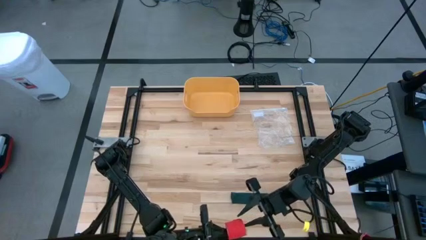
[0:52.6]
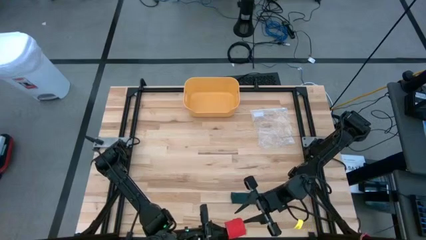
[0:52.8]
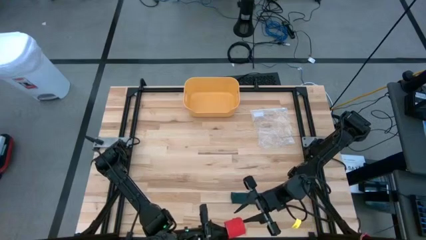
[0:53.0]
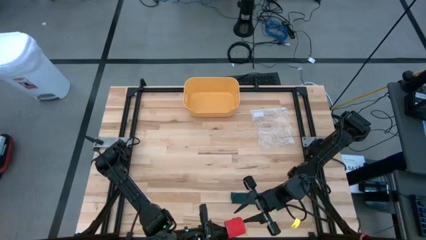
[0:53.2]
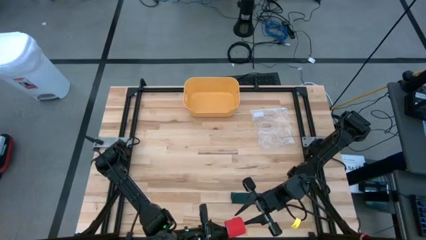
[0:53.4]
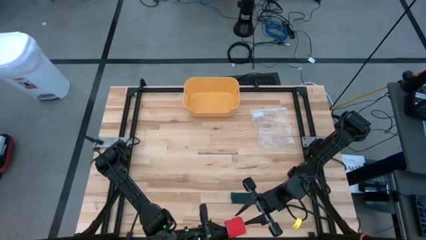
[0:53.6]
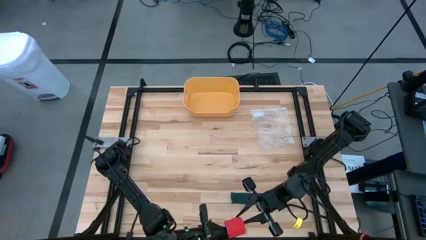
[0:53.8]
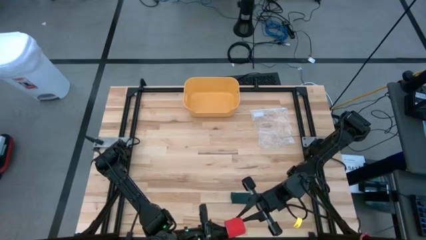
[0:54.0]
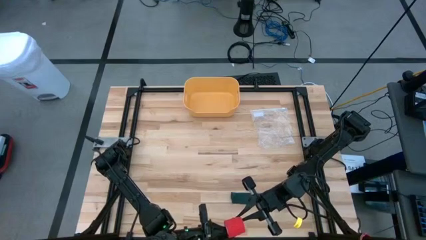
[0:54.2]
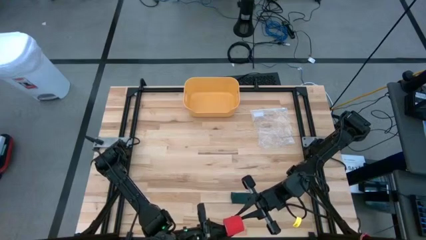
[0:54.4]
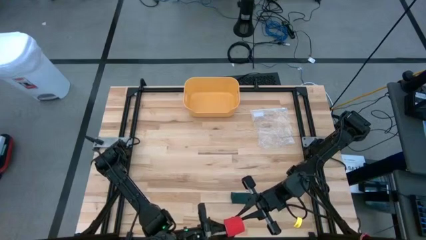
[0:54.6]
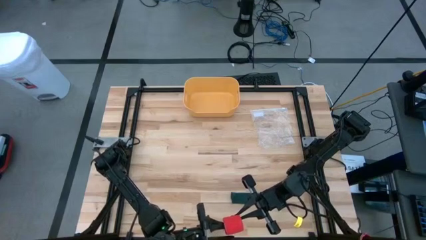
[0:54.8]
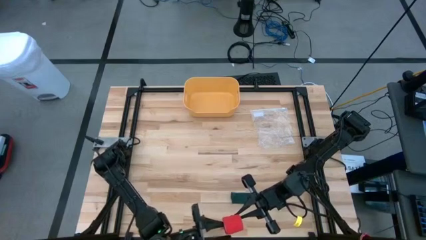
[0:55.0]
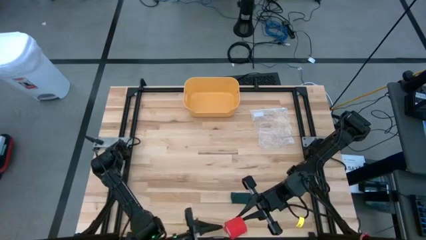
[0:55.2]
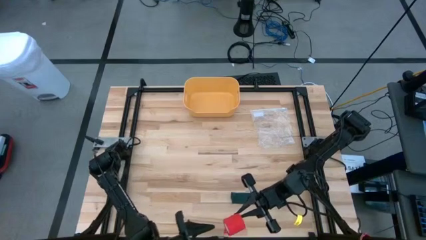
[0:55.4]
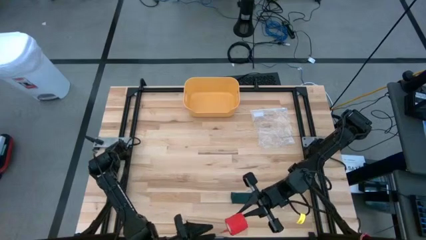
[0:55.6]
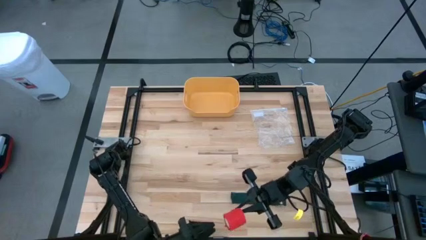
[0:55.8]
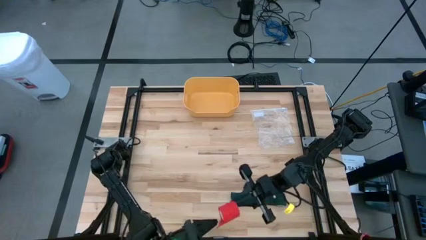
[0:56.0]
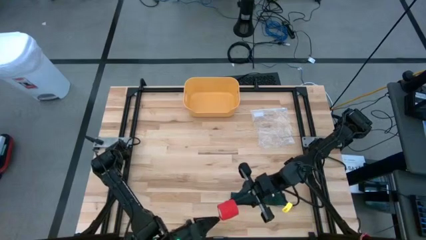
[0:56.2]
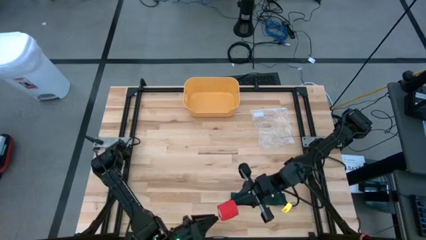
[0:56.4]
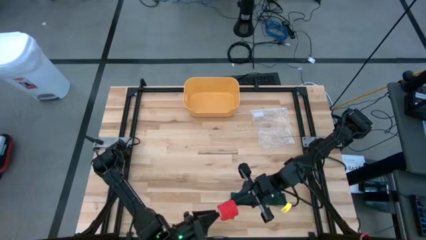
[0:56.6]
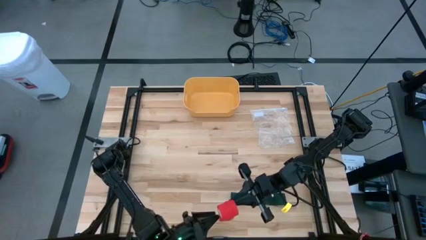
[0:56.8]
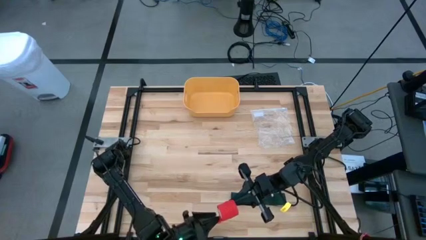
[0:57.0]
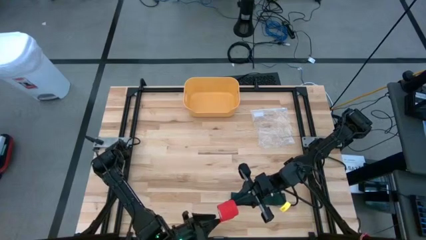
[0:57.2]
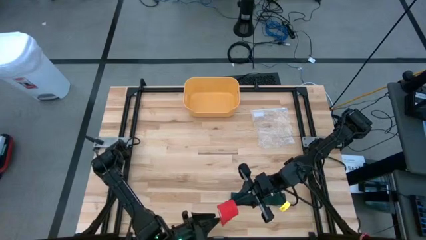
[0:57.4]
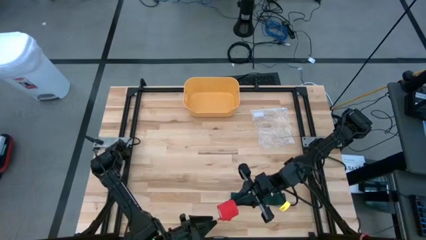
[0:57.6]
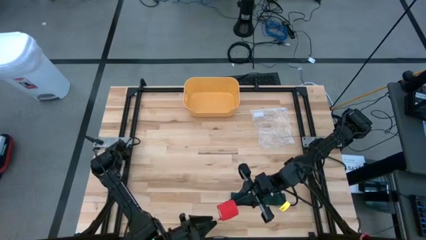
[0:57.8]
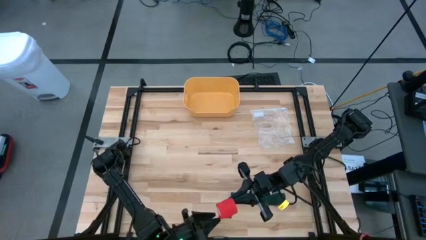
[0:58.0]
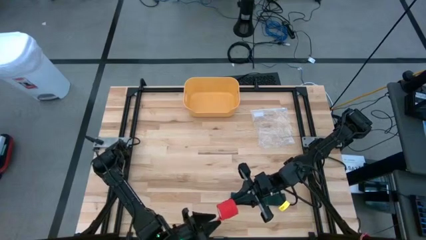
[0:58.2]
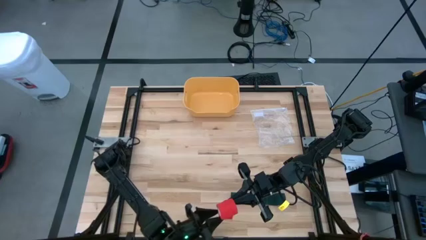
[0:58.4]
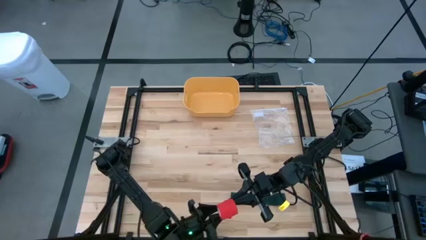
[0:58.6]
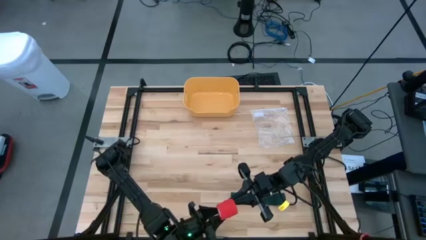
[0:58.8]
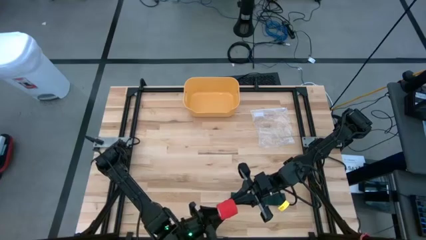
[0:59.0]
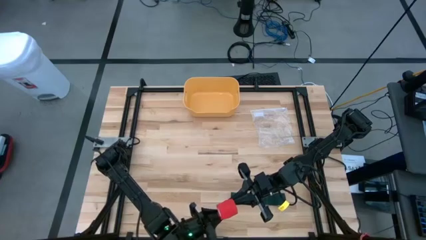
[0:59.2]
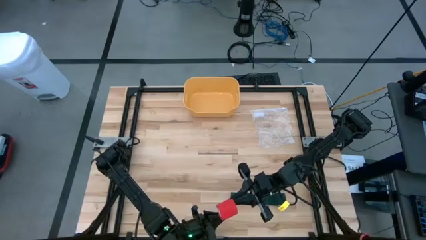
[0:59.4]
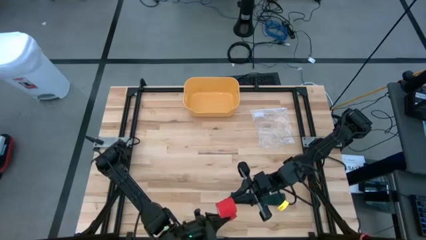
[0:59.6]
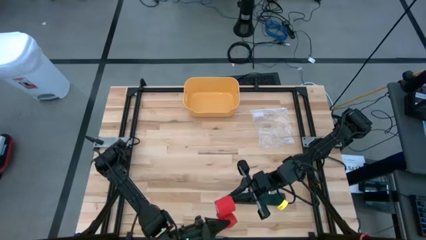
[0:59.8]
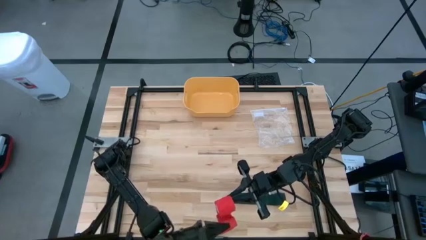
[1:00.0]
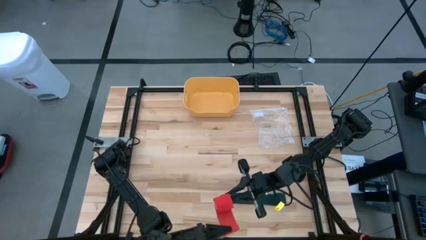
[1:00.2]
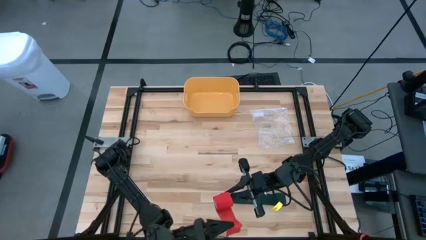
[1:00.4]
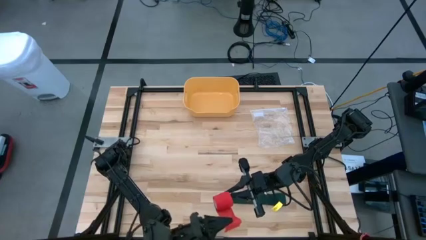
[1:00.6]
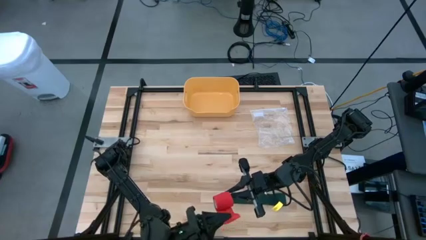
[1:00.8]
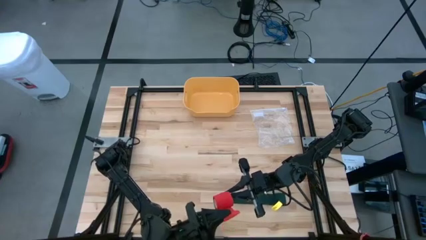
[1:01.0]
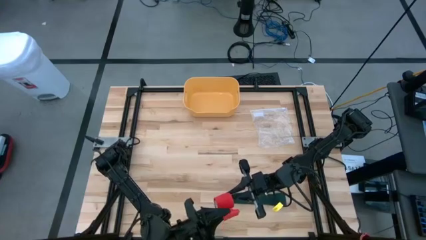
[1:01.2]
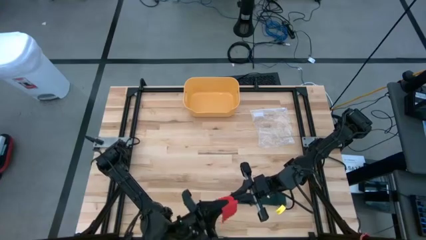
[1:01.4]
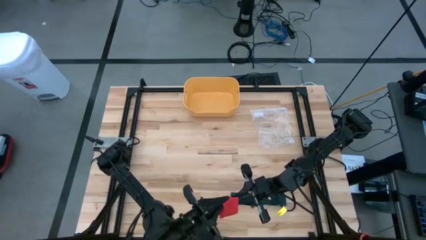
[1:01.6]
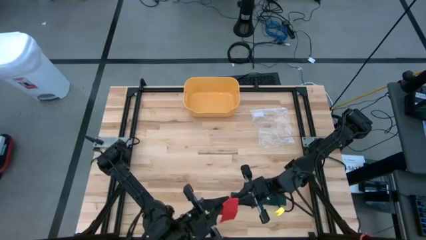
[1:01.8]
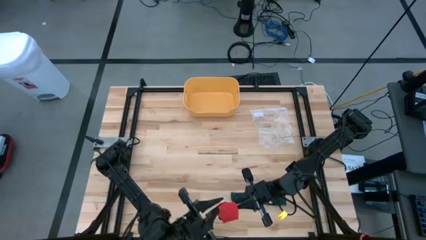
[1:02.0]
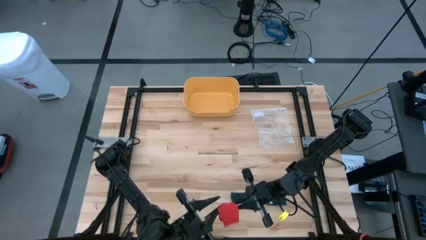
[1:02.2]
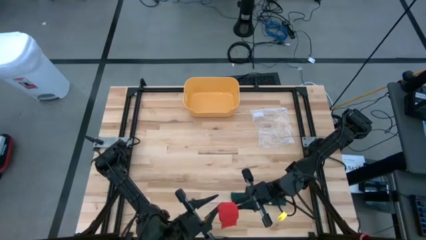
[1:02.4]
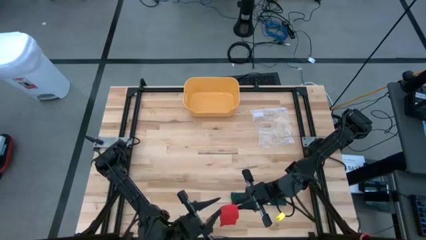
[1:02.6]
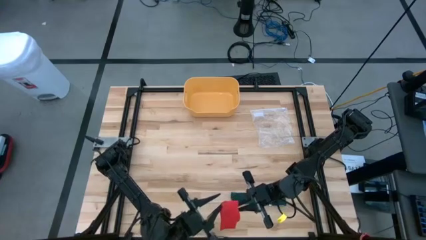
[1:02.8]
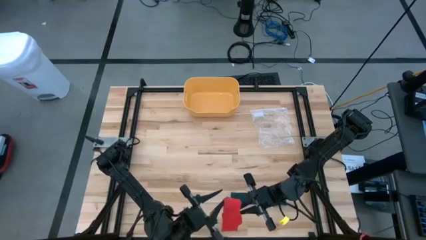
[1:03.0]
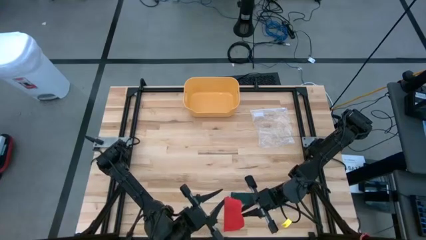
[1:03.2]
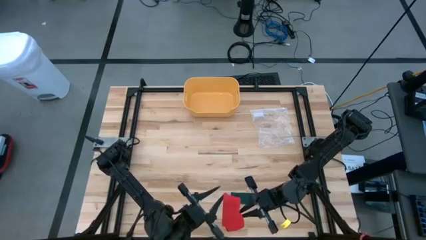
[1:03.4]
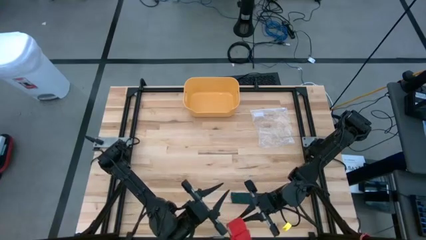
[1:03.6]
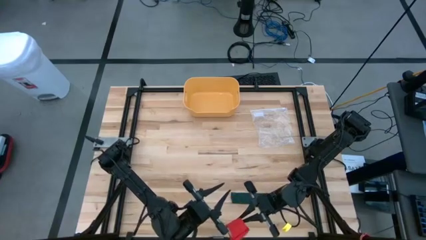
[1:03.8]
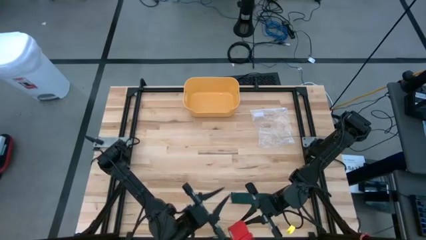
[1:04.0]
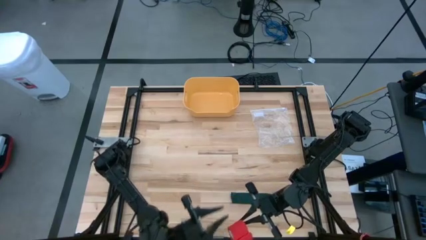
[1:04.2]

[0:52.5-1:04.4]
Task: Roll bandage
Roll the red bandage

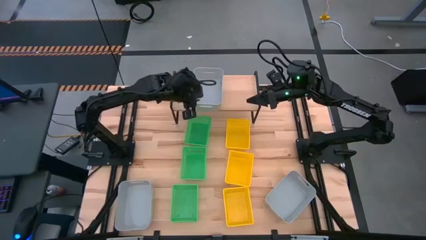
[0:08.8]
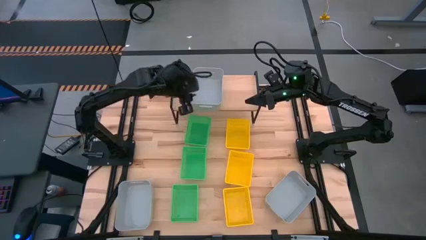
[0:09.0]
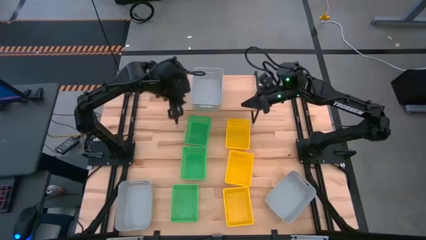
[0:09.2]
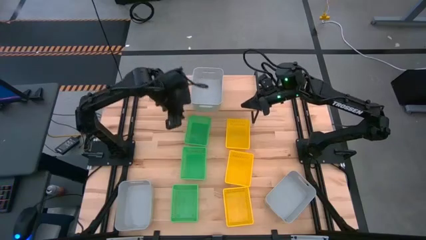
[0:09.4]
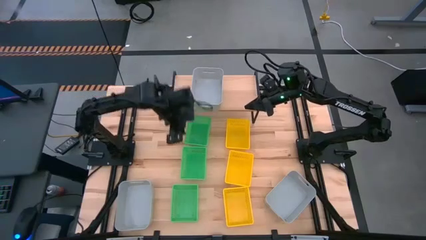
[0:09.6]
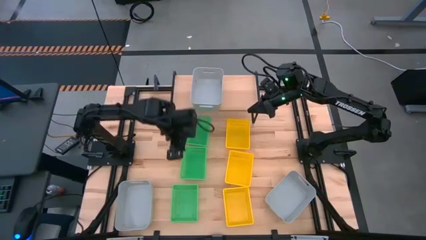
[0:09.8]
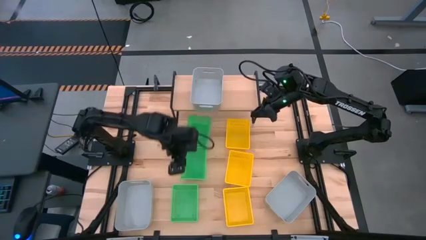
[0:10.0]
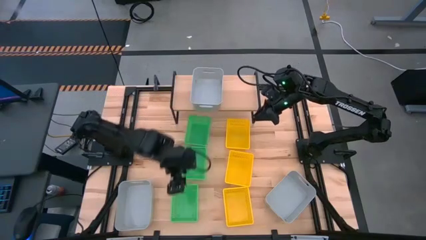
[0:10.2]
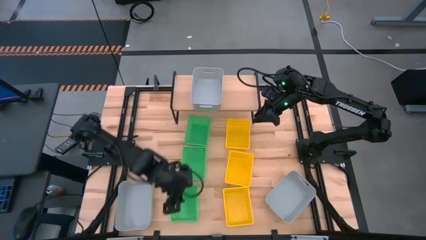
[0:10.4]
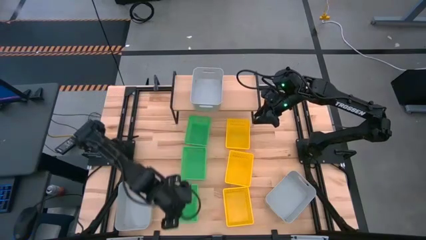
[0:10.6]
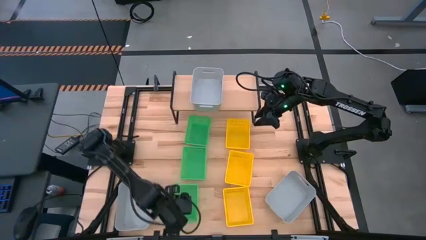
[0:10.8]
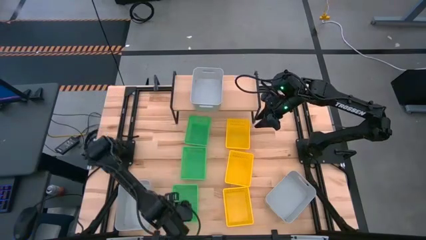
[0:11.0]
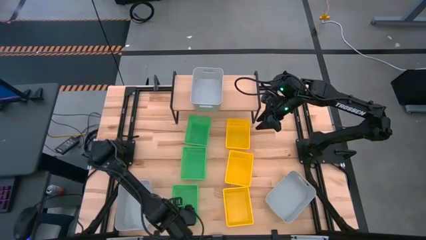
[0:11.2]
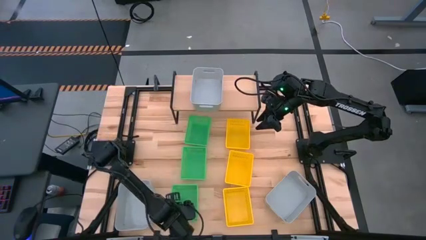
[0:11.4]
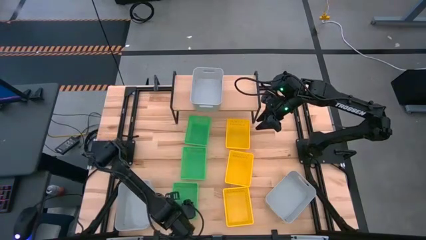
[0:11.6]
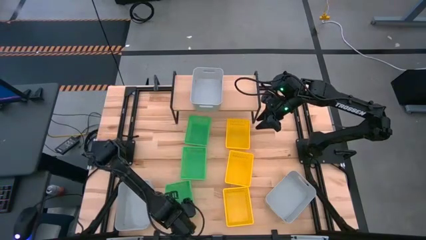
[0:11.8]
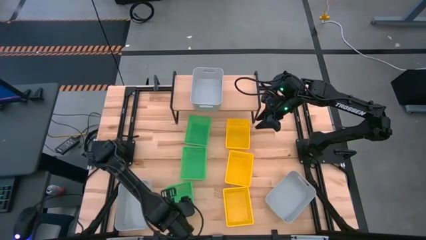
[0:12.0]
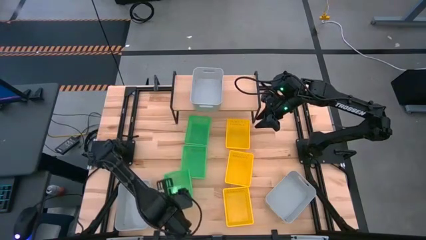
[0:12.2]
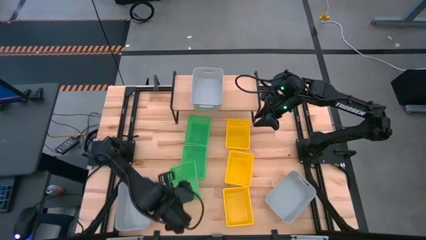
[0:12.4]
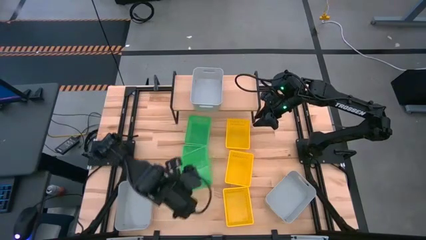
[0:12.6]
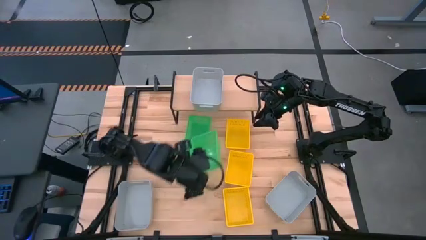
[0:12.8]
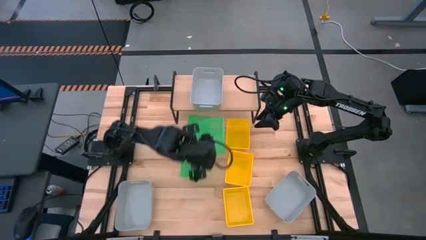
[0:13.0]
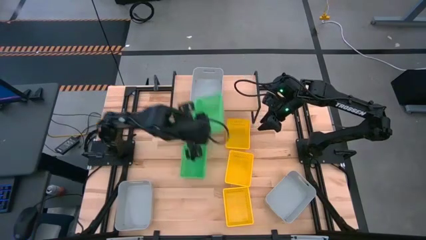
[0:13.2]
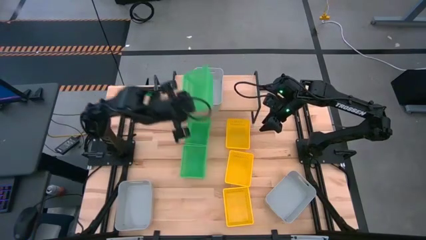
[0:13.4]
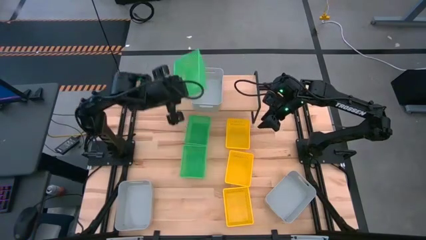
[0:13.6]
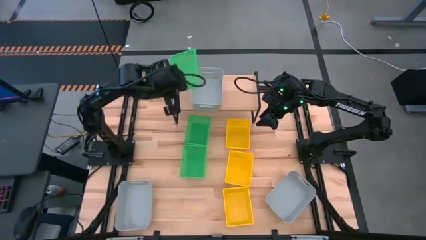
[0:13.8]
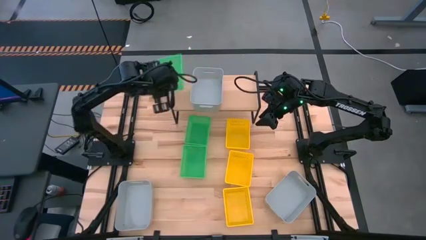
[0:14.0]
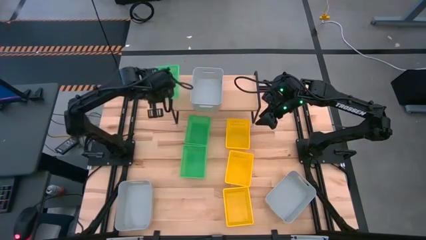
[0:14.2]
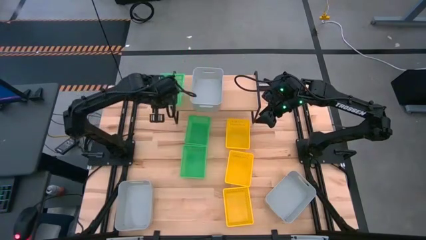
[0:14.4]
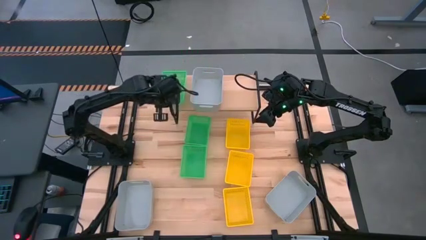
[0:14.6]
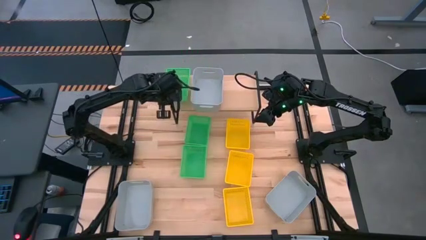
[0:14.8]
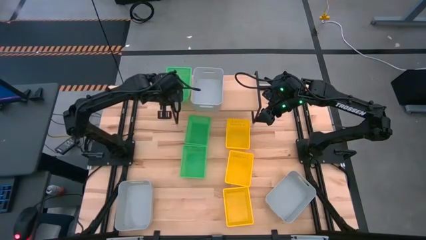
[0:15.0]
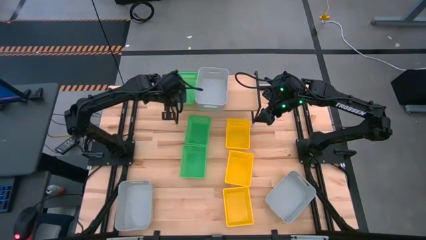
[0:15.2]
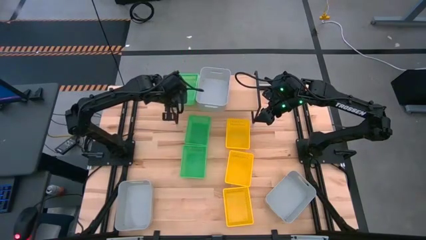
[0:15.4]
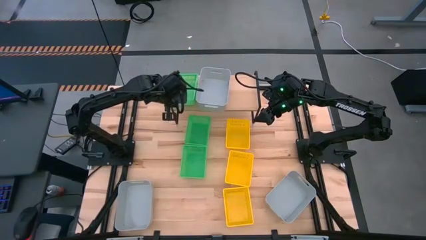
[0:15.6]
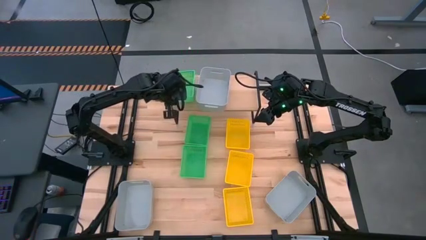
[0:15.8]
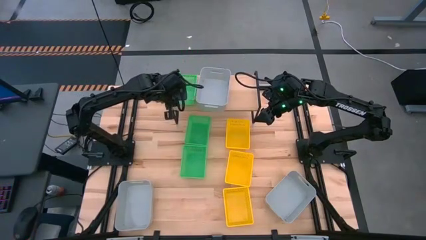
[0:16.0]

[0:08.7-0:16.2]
Task: Stack baskets on shelf by color
Put the bottom green bin on the shelf
